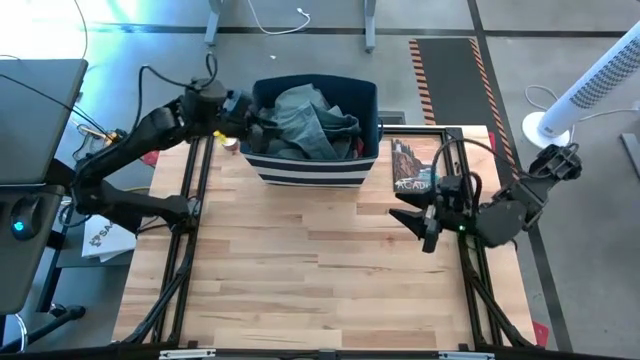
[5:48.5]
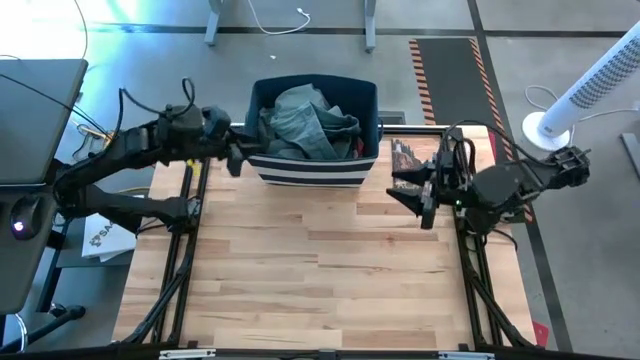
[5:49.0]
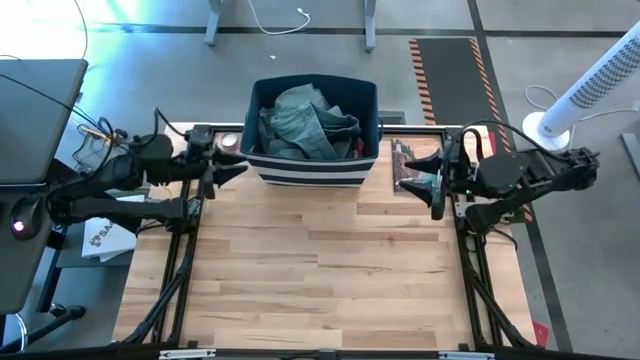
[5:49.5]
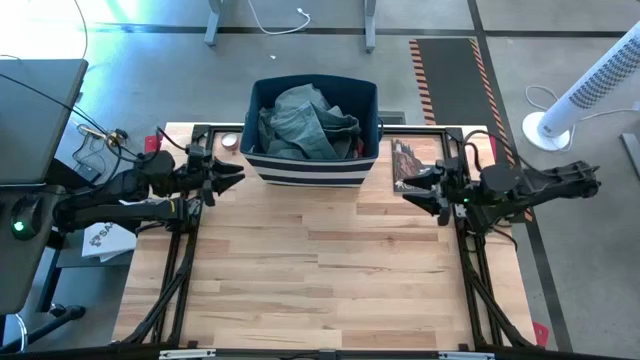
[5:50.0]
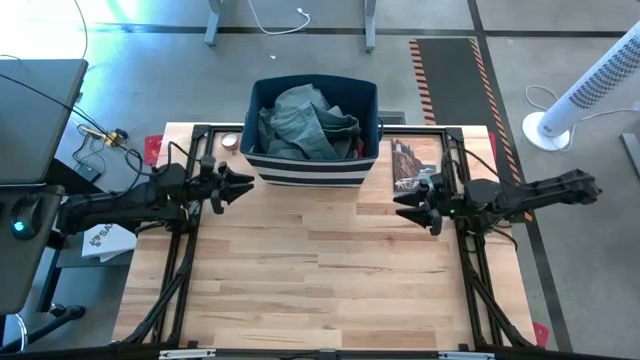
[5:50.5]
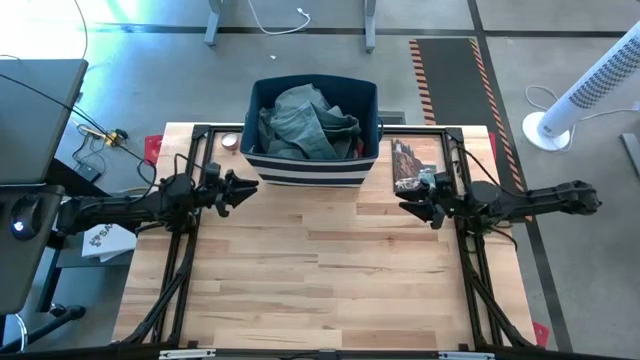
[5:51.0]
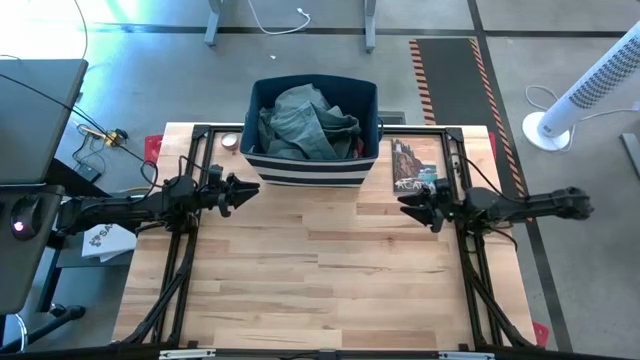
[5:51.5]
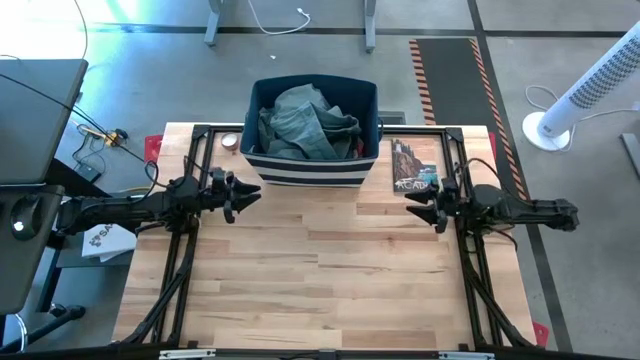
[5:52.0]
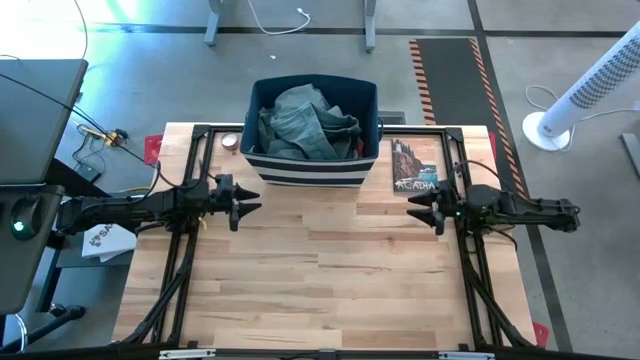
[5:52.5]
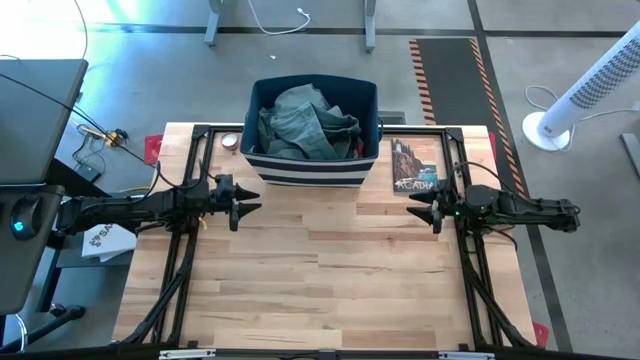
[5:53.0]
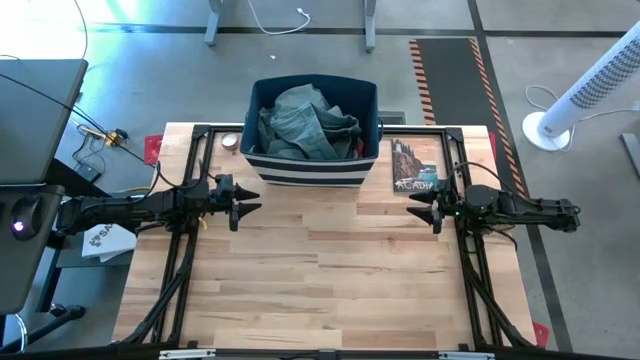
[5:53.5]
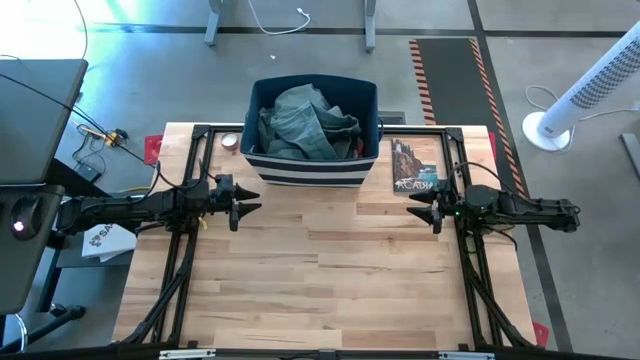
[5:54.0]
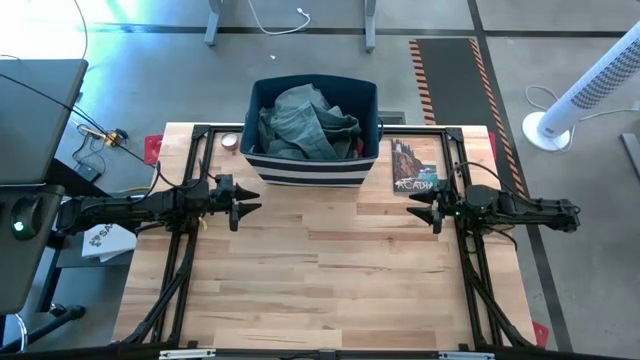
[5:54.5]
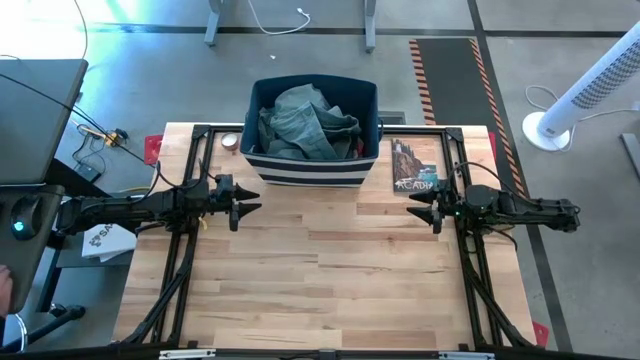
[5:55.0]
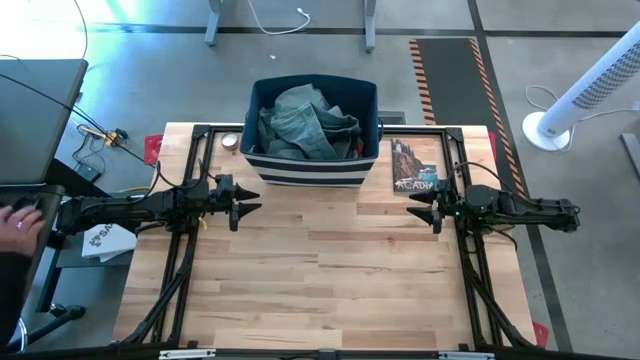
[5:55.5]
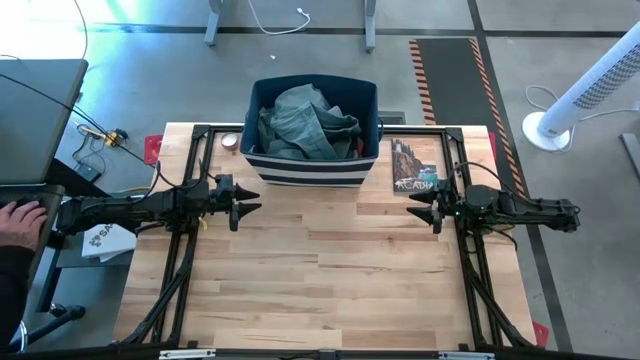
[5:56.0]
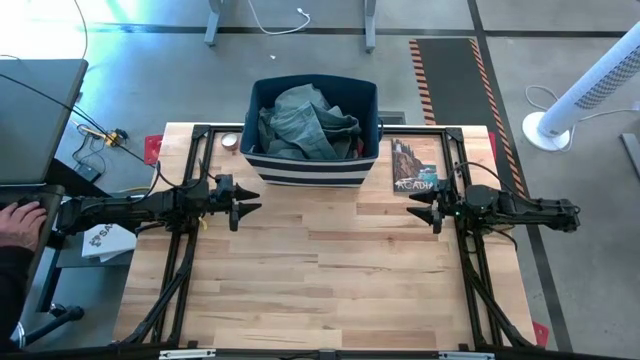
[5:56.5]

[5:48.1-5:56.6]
Task: Sort clothes
Return to Home Position

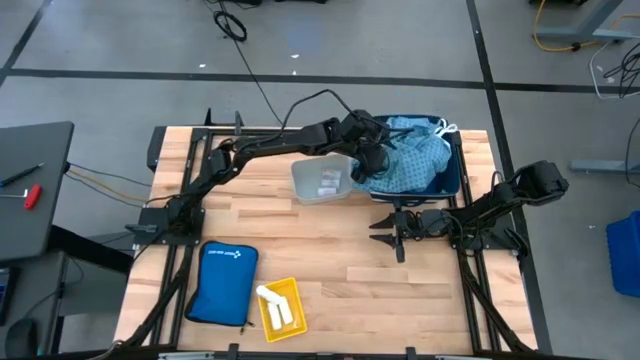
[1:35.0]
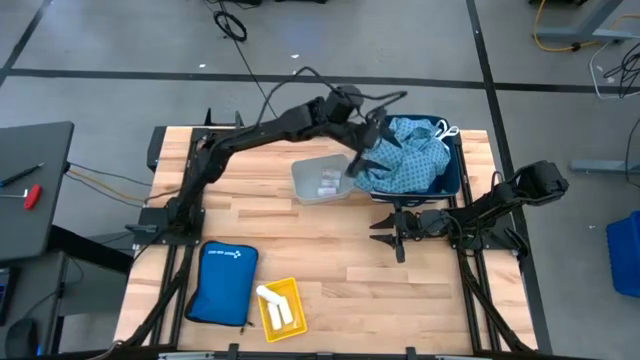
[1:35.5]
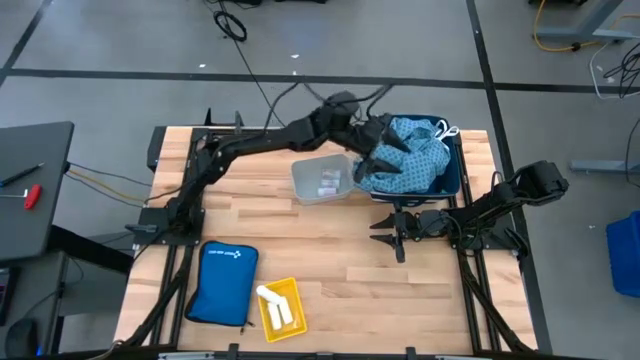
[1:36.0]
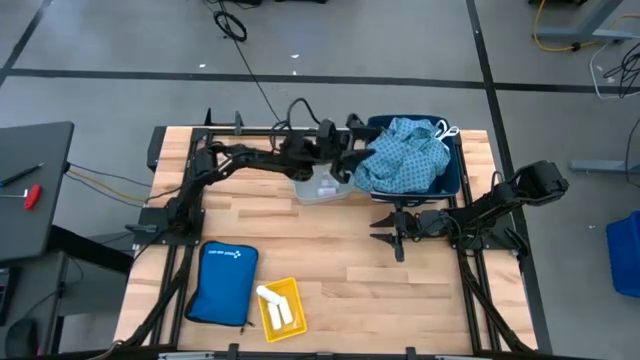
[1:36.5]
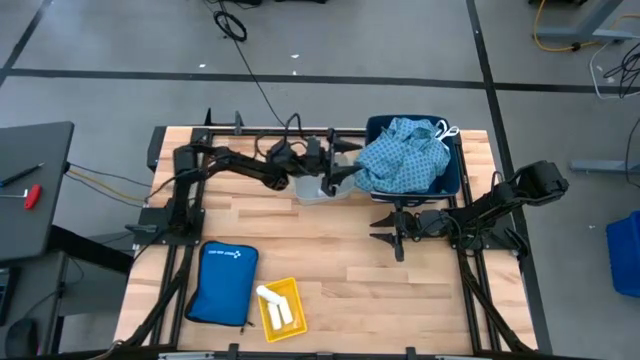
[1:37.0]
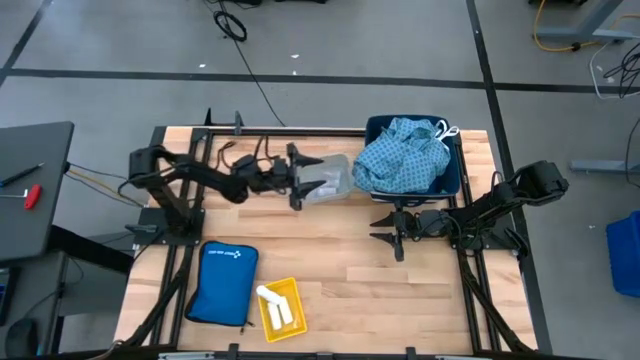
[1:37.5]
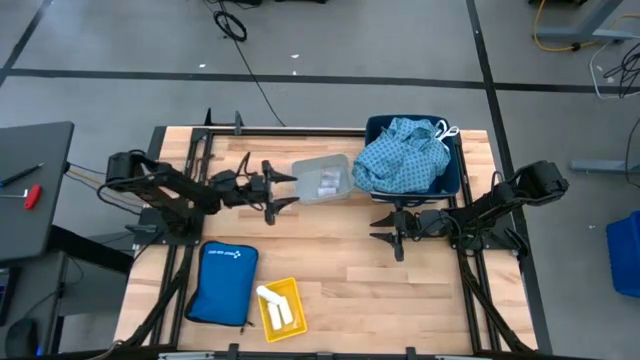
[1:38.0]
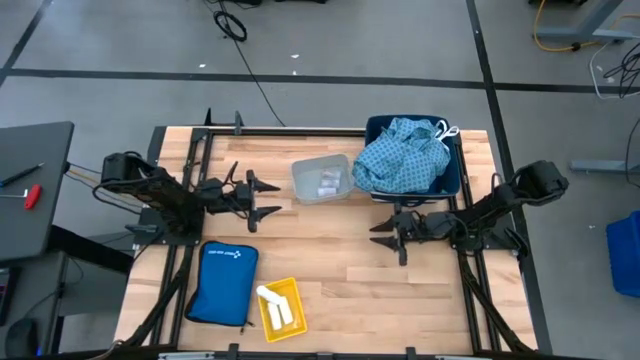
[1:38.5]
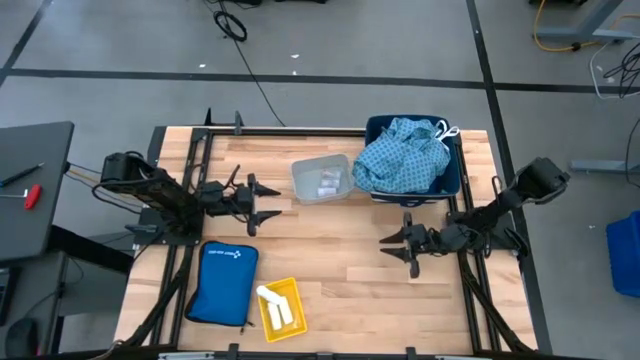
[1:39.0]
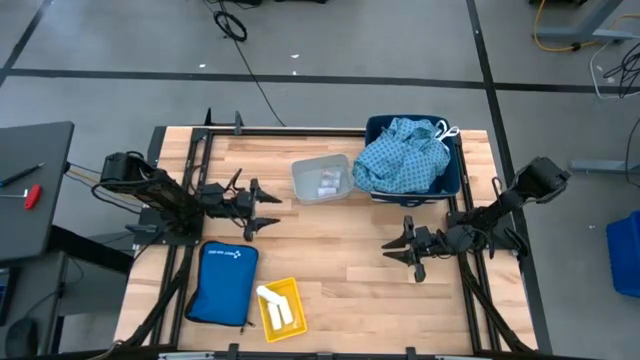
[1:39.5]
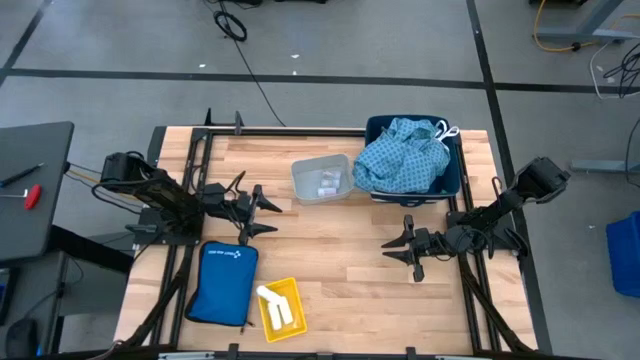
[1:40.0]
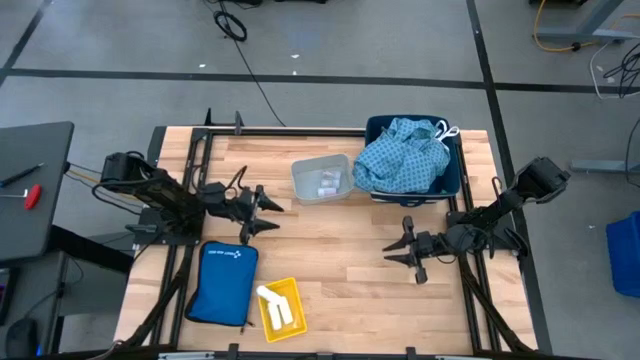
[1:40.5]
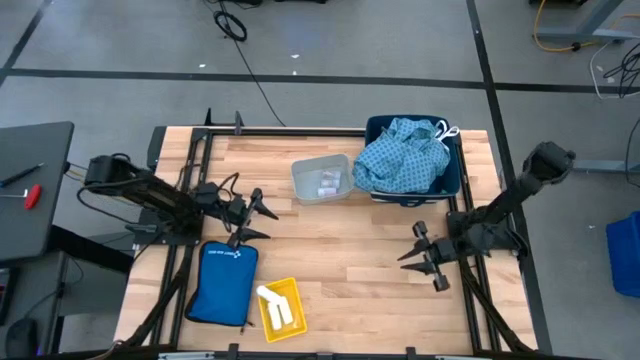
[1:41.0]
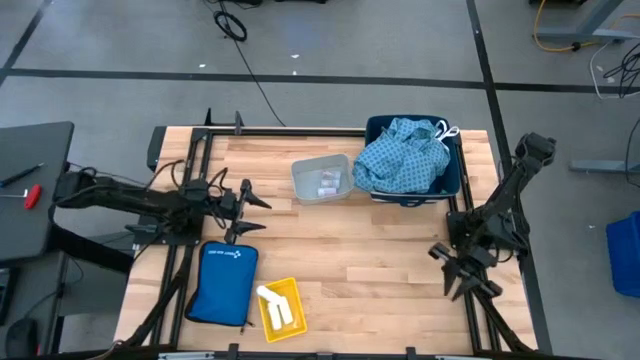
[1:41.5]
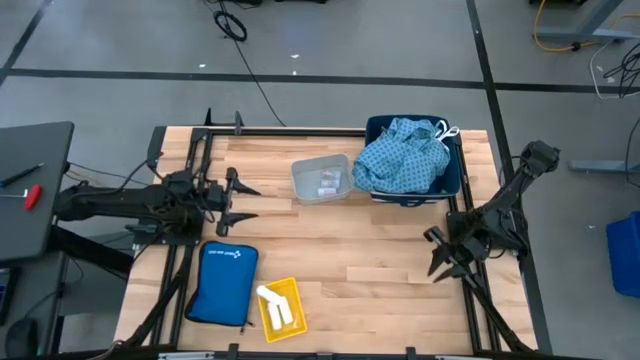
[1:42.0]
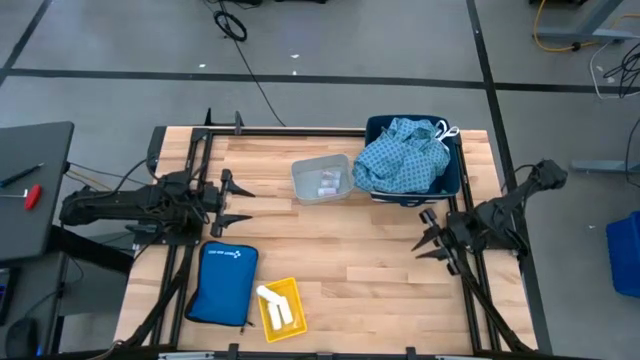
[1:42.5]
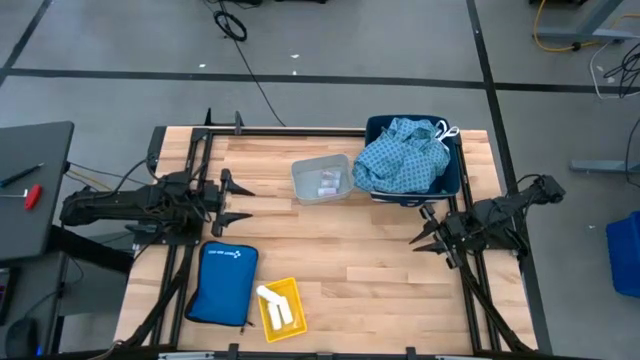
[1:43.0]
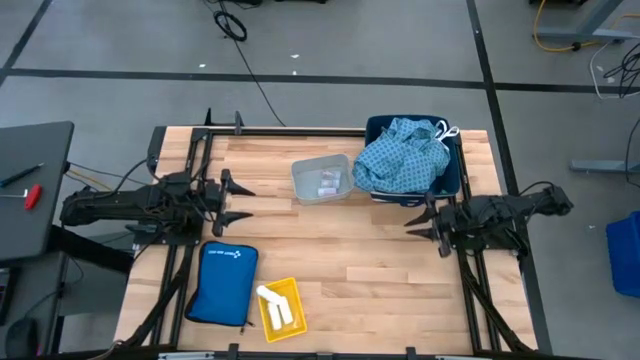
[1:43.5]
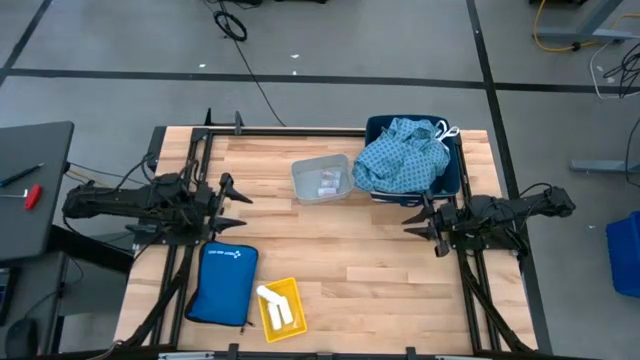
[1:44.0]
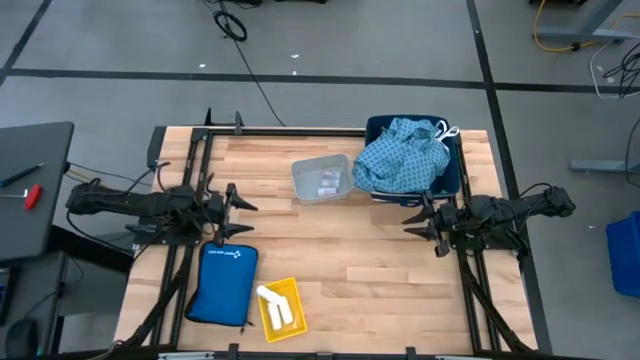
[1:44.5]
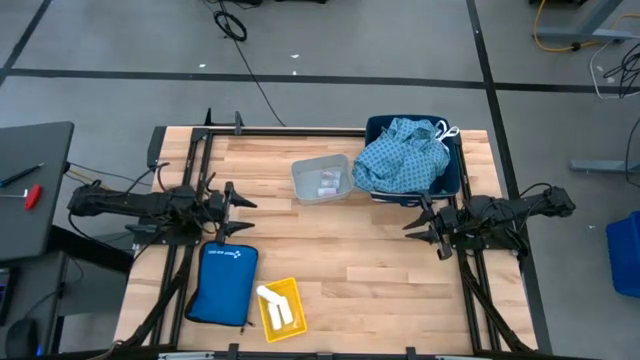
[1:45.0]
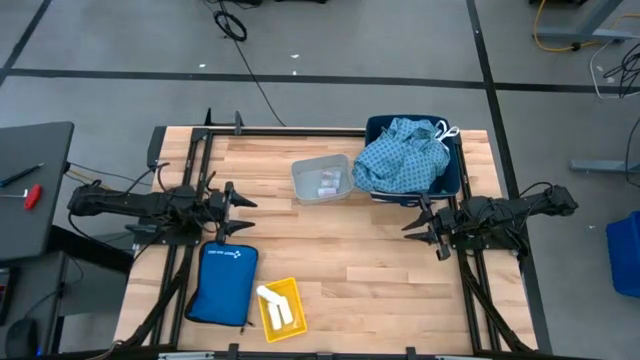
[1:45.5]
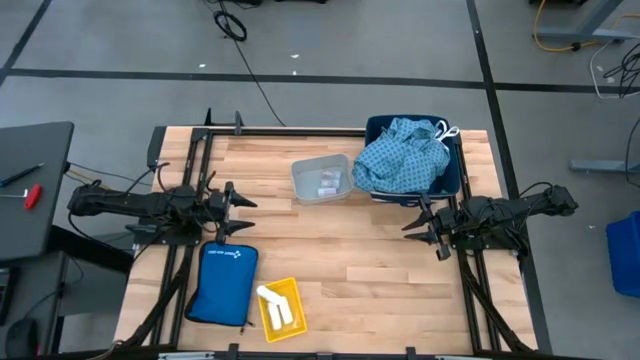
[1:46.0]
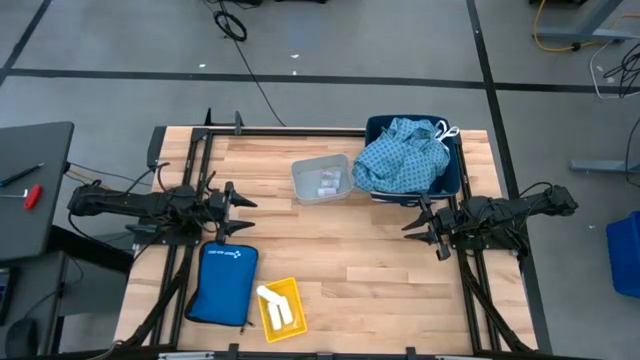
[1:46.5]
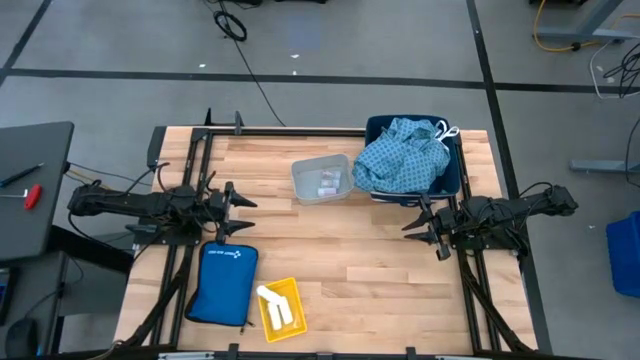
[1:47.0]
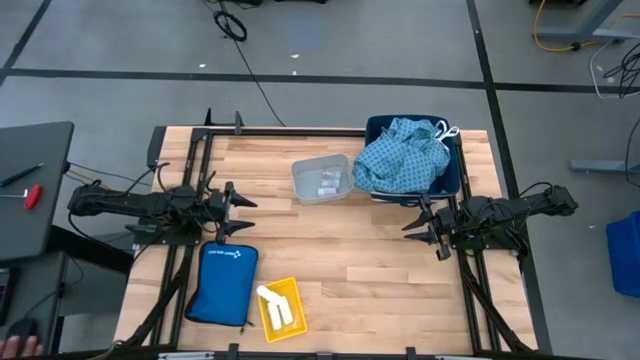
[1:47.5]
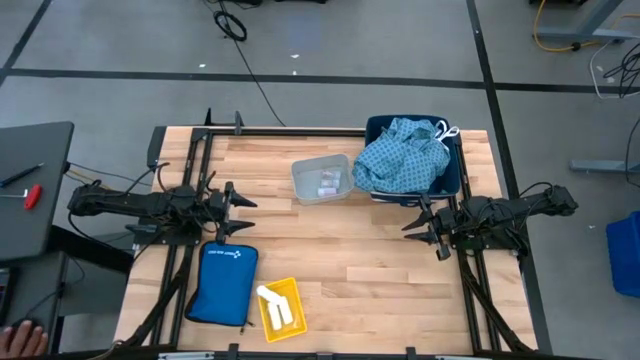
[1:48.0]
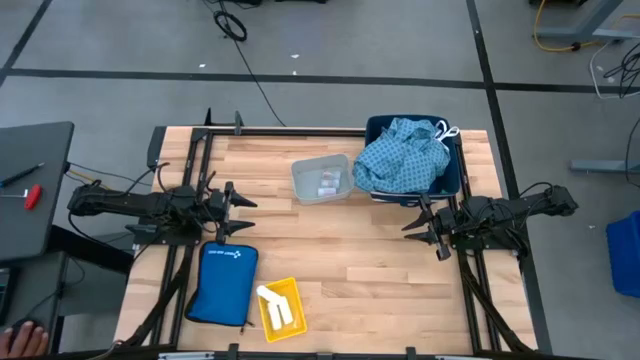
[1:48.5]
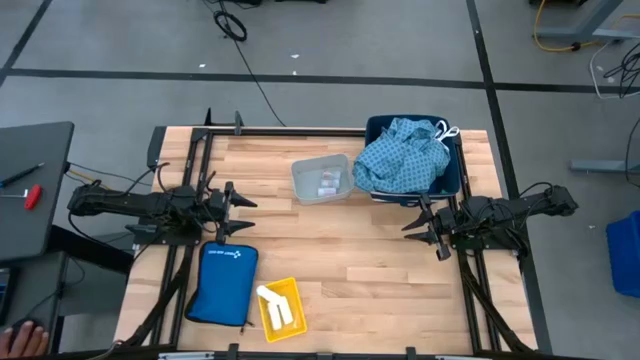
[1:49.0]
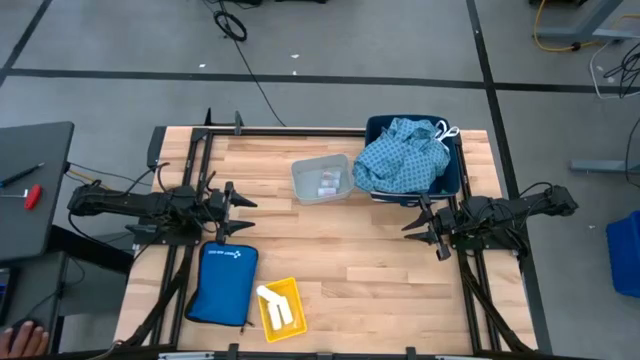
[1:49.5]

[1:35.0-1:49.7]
Task: Pick & place medical supplies in basket/bin
Return to Home Position
